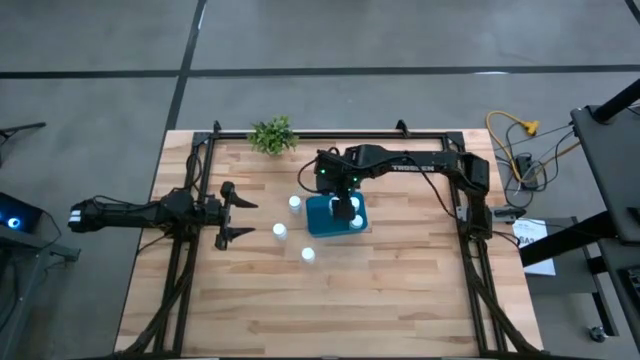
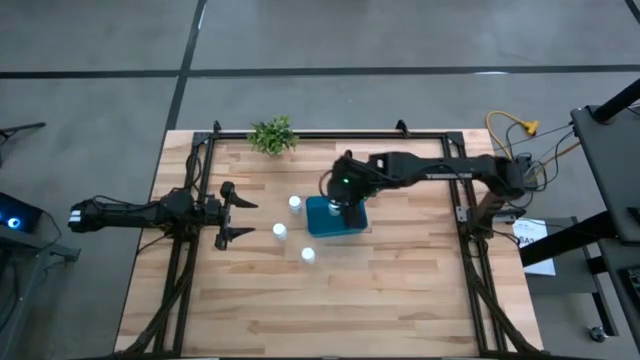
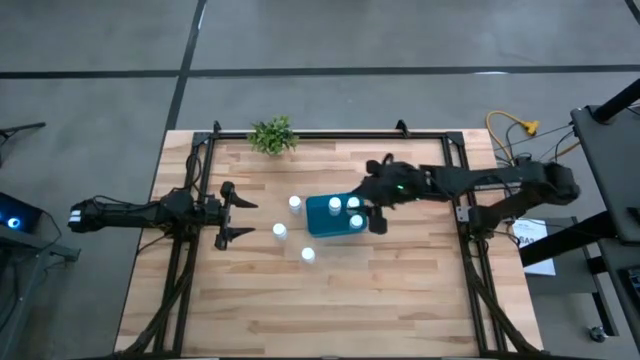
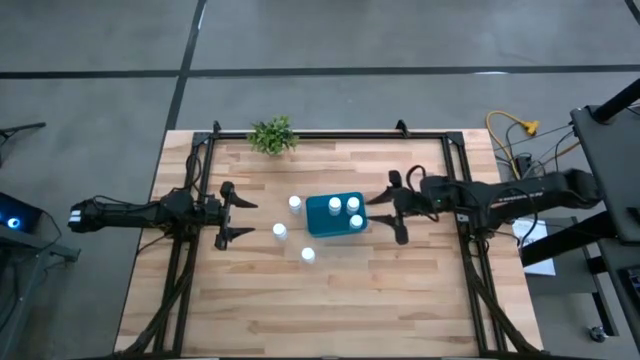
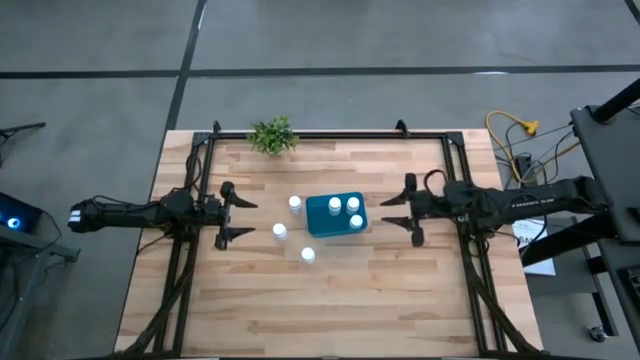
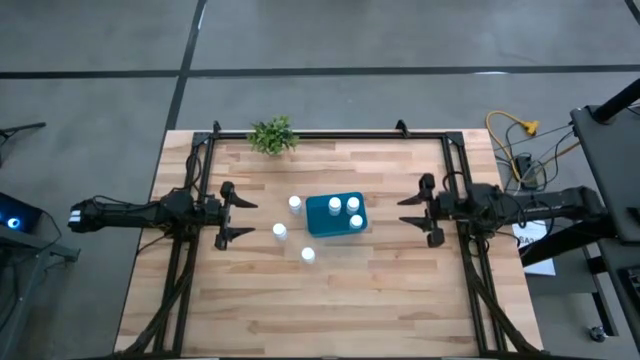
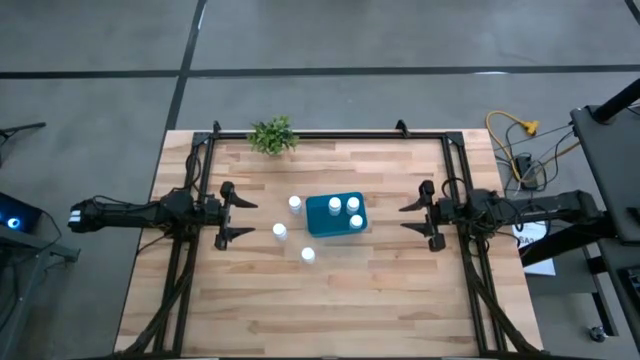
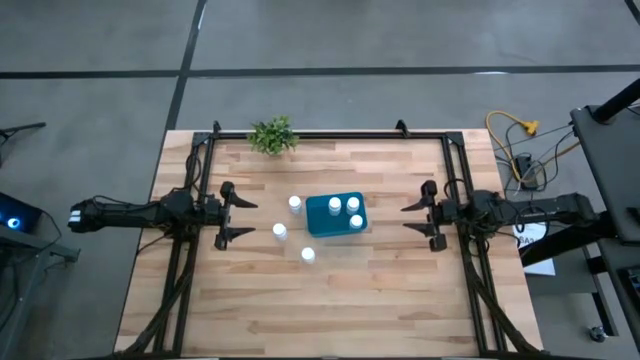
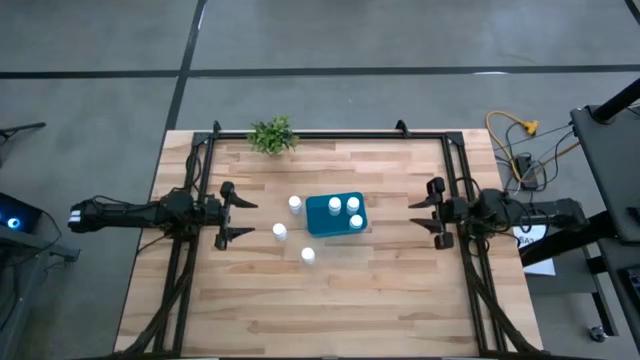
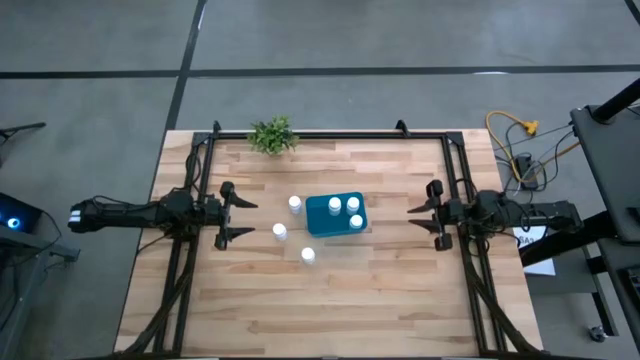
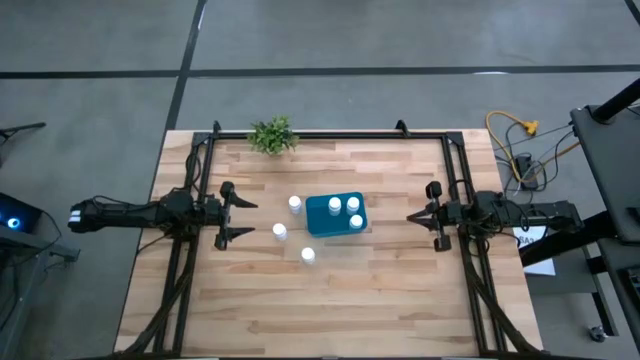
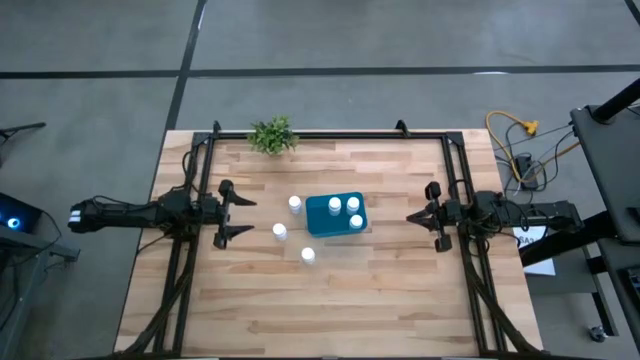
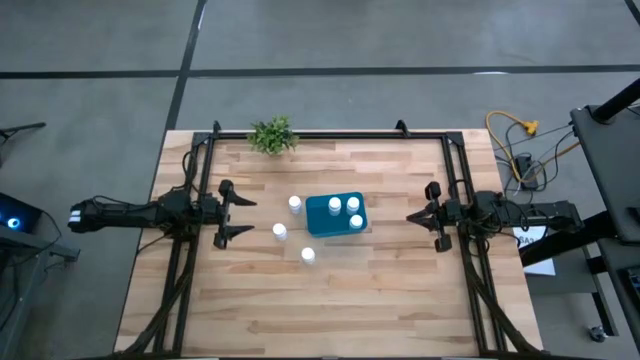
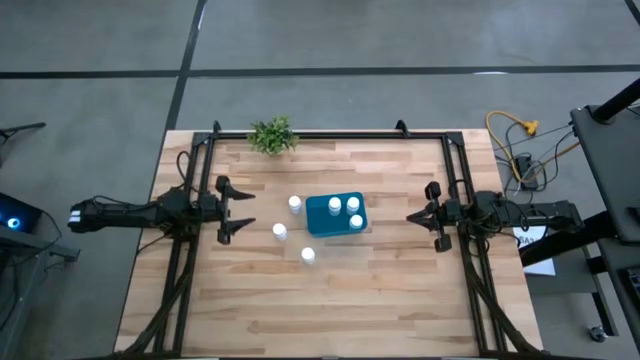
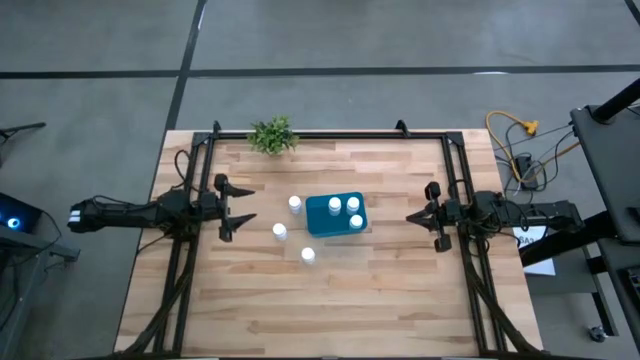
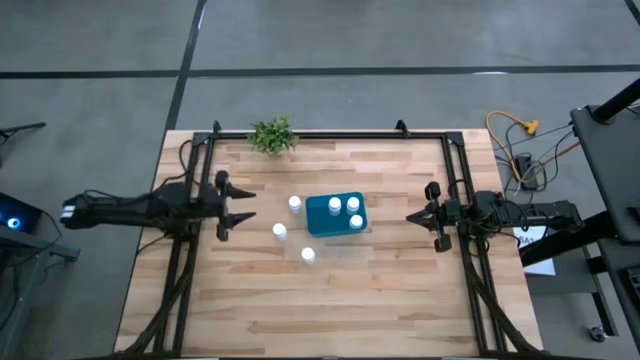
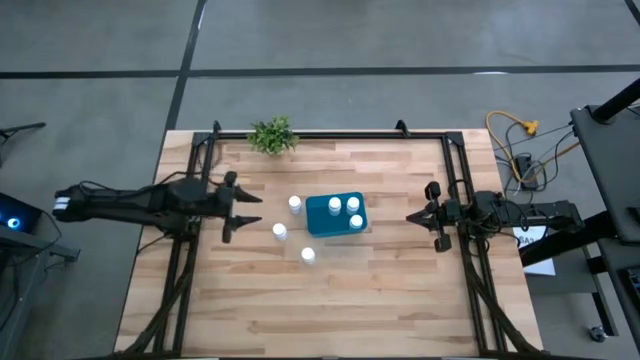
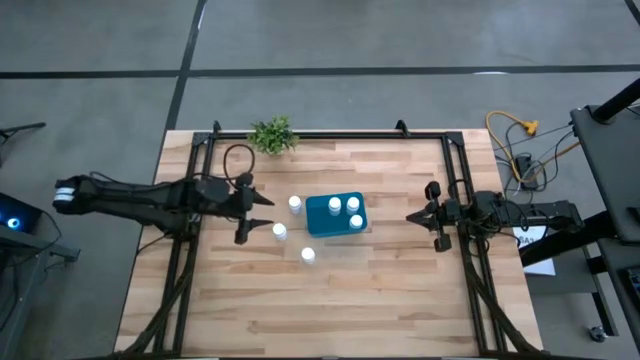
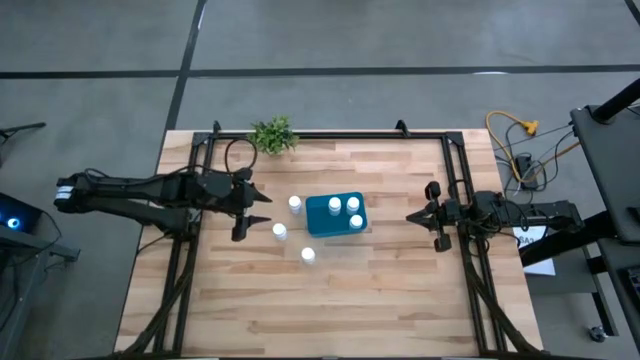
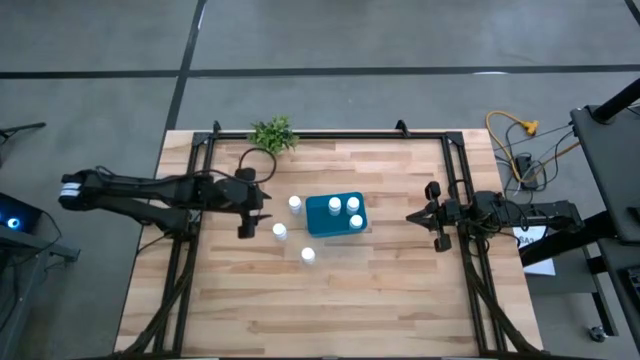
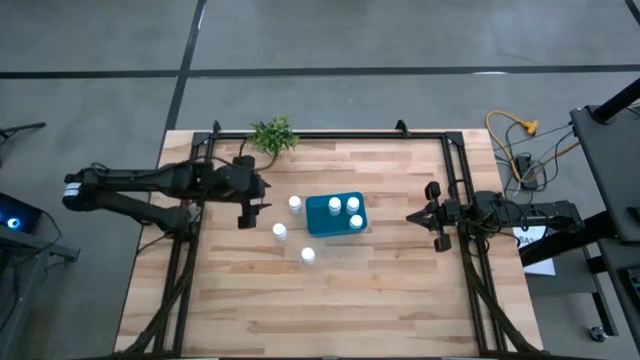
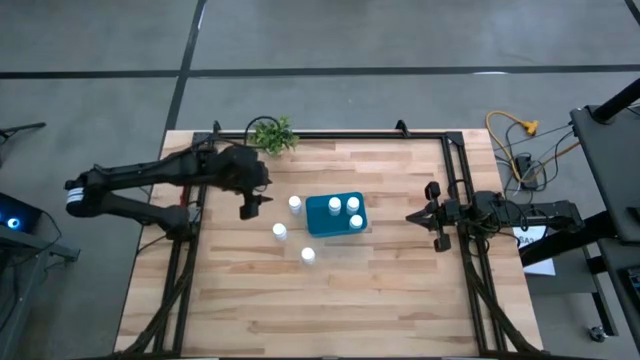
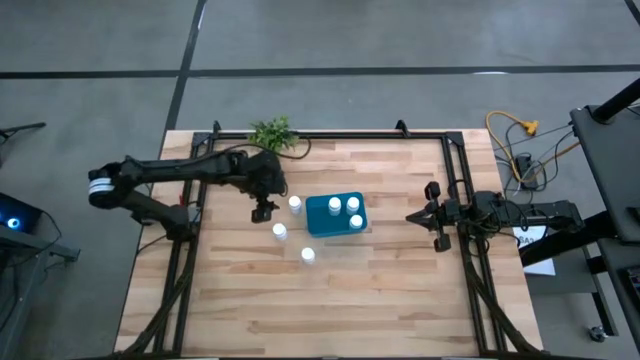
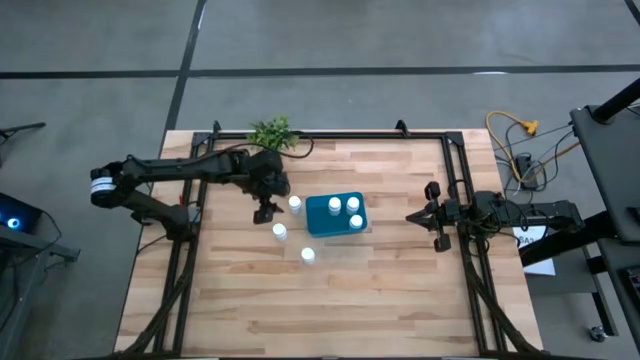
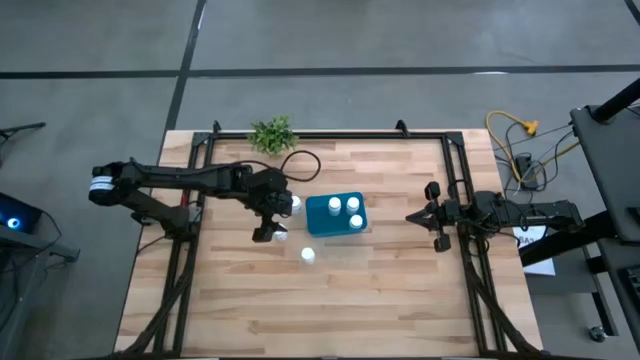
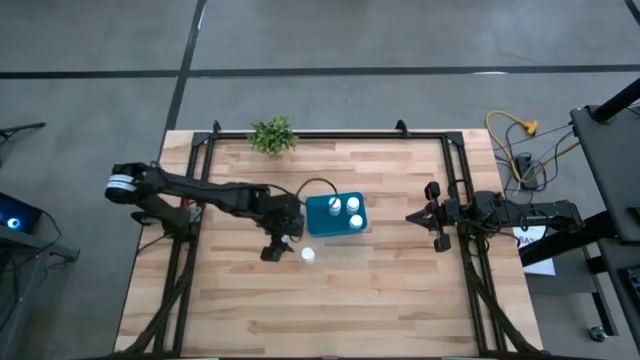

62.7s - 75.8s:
Task: Pick and place pill bottles into a basket
Put the white medicine bottle into the blue bin
